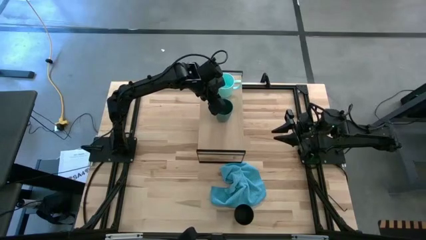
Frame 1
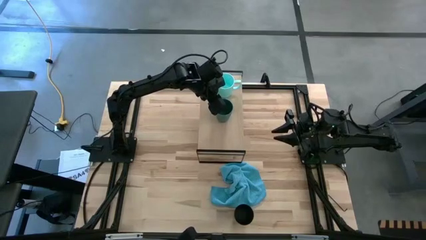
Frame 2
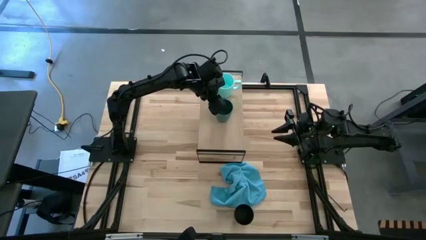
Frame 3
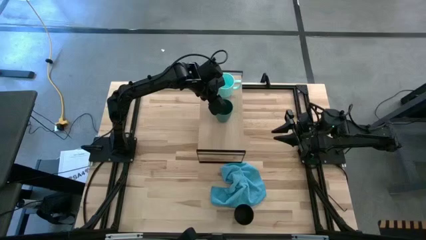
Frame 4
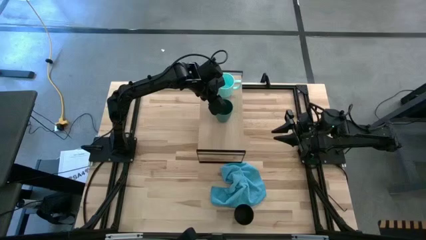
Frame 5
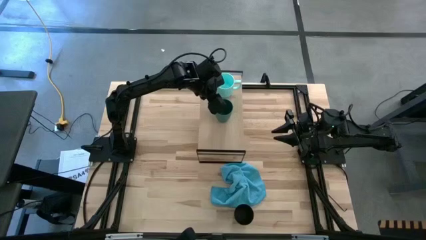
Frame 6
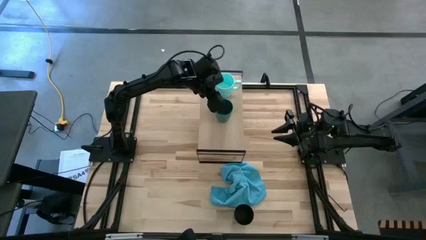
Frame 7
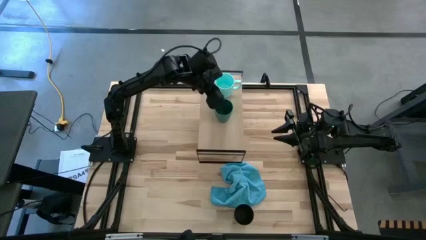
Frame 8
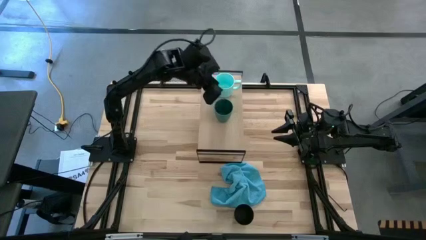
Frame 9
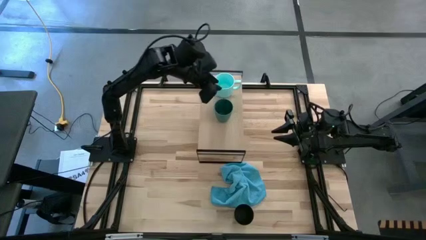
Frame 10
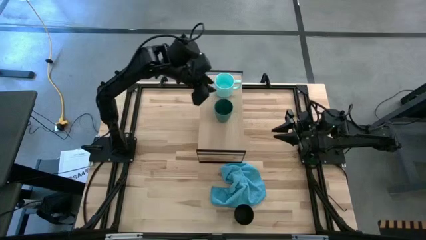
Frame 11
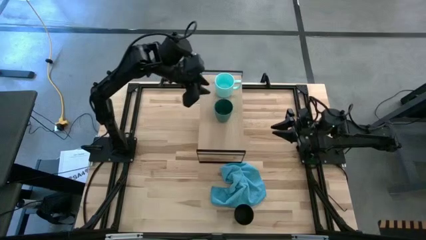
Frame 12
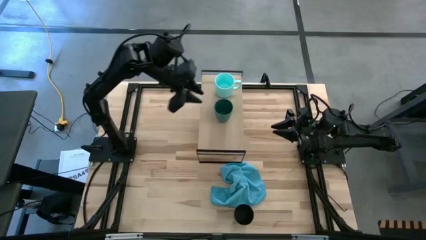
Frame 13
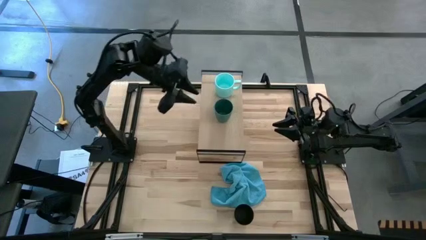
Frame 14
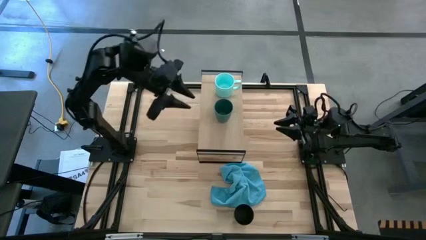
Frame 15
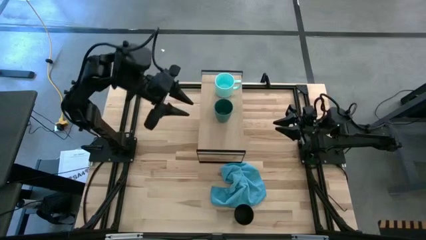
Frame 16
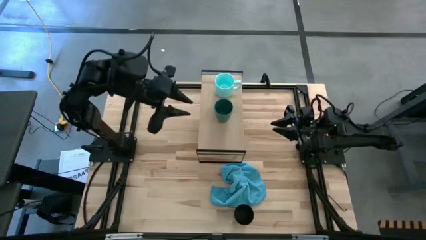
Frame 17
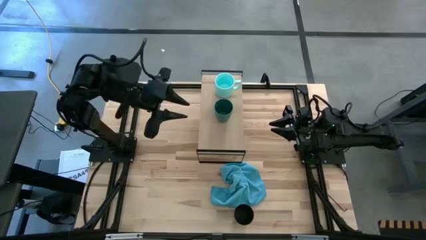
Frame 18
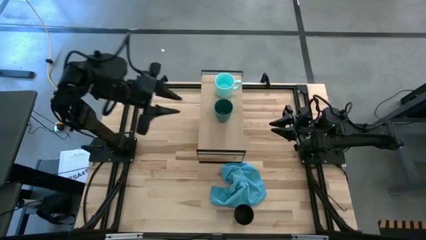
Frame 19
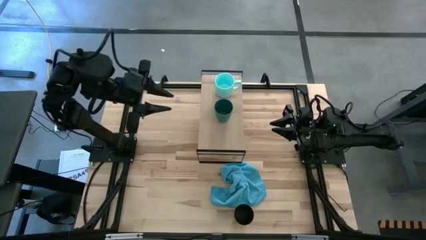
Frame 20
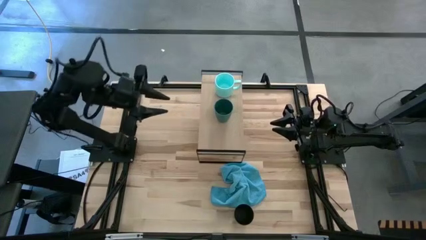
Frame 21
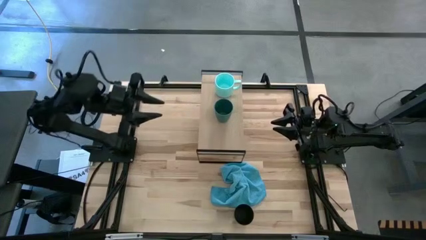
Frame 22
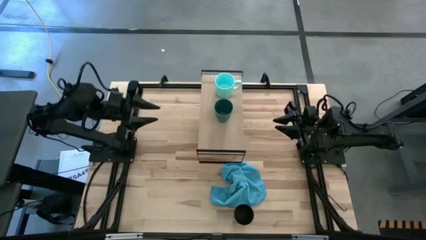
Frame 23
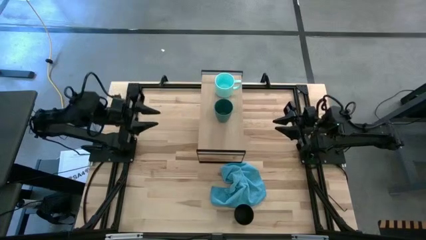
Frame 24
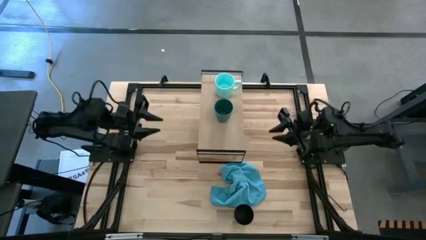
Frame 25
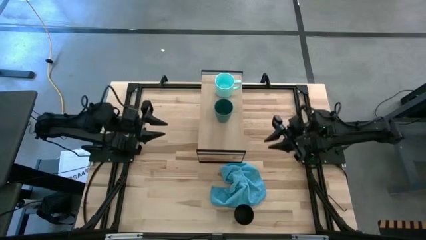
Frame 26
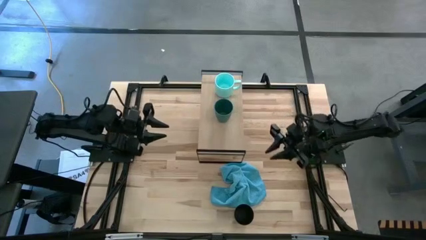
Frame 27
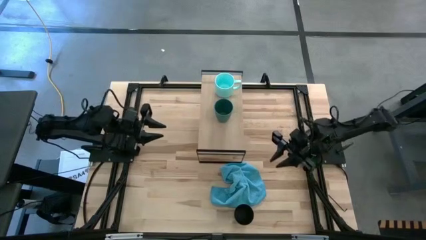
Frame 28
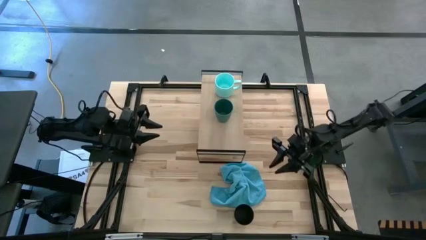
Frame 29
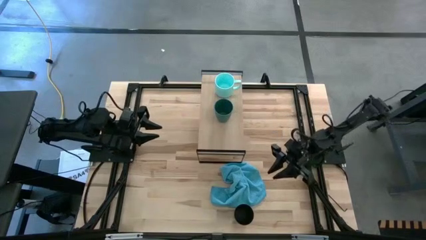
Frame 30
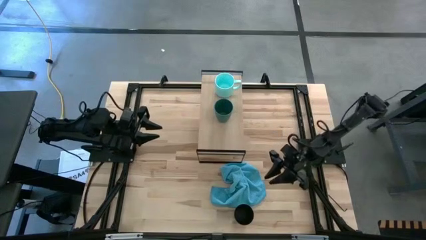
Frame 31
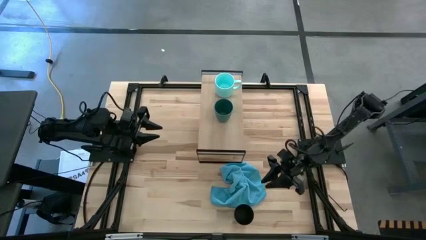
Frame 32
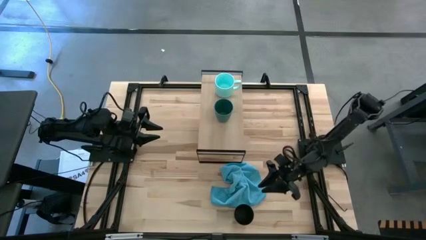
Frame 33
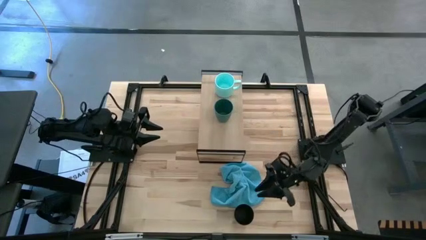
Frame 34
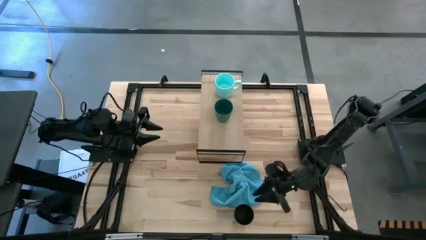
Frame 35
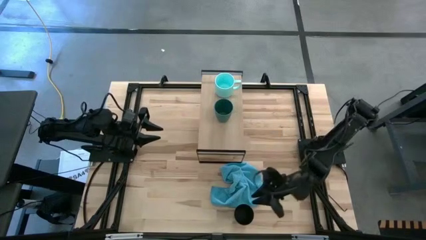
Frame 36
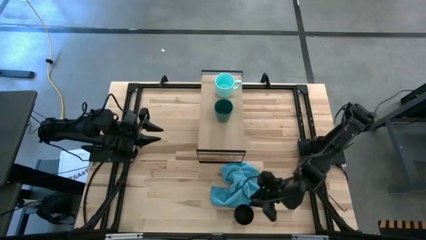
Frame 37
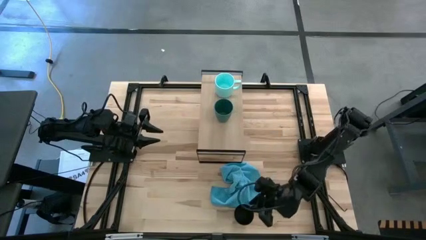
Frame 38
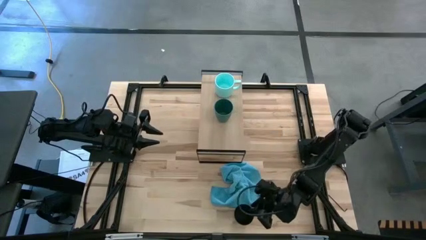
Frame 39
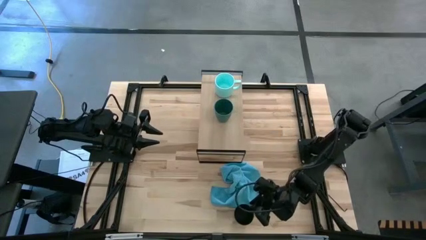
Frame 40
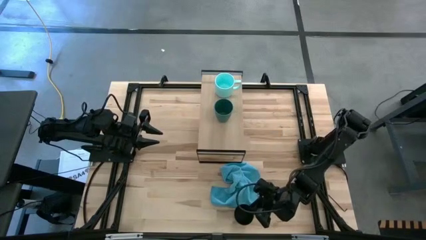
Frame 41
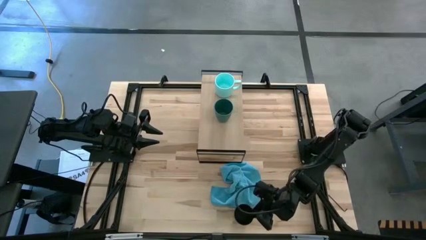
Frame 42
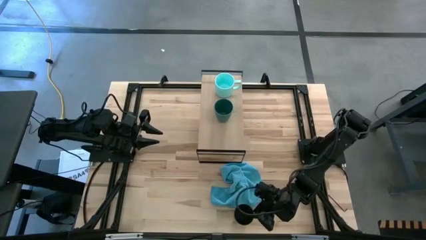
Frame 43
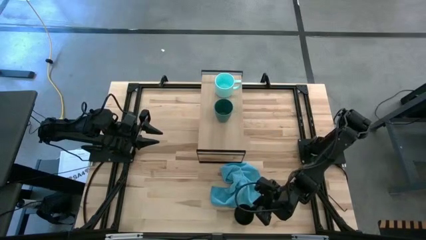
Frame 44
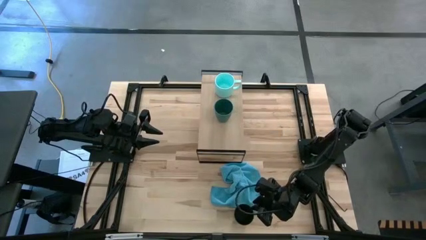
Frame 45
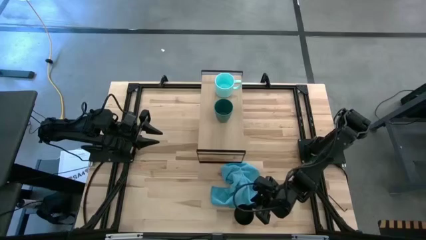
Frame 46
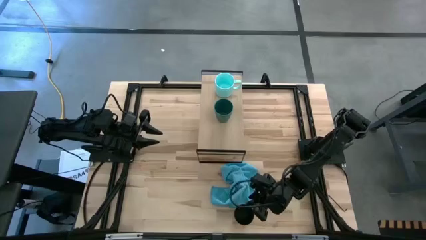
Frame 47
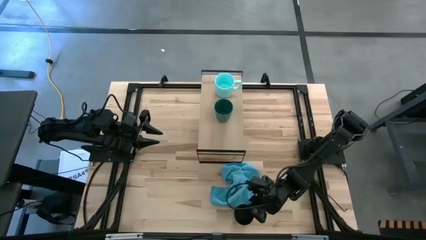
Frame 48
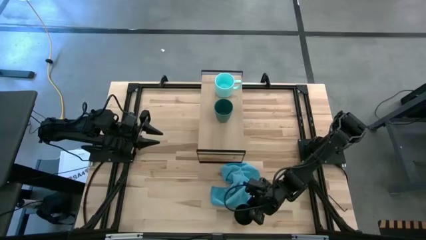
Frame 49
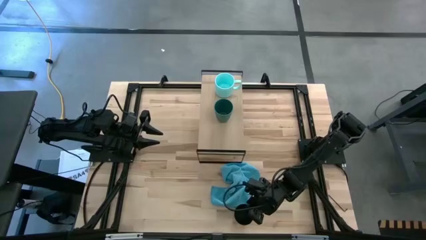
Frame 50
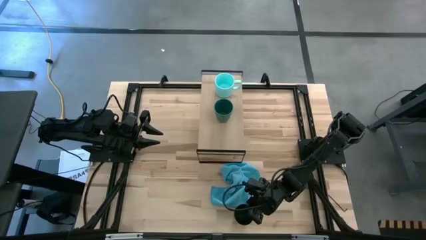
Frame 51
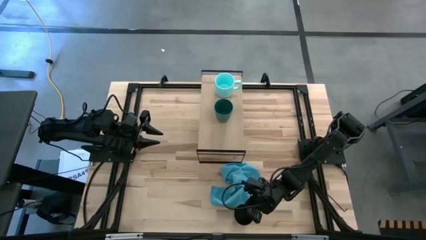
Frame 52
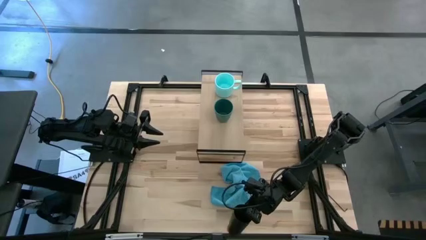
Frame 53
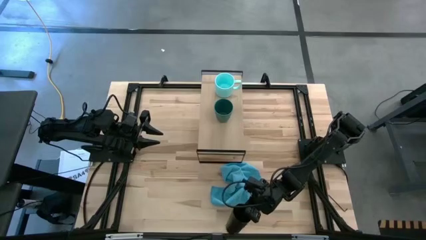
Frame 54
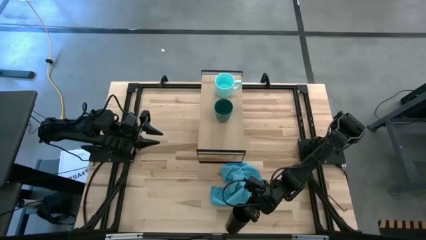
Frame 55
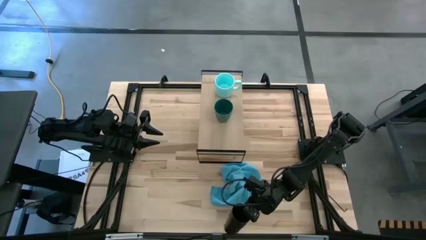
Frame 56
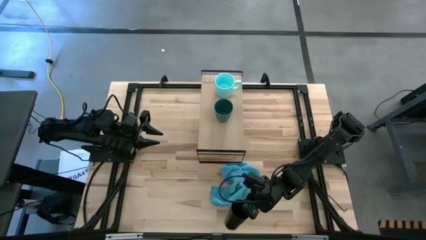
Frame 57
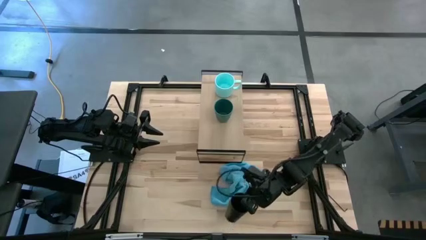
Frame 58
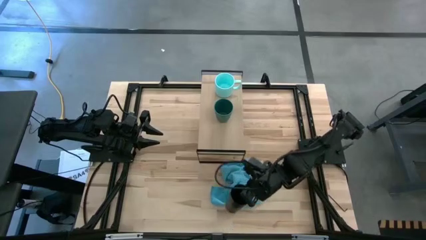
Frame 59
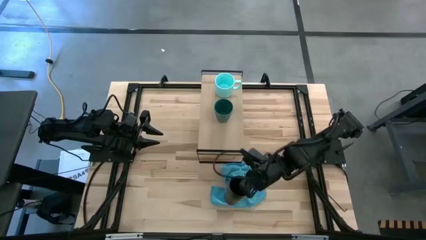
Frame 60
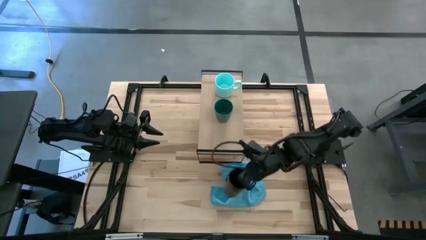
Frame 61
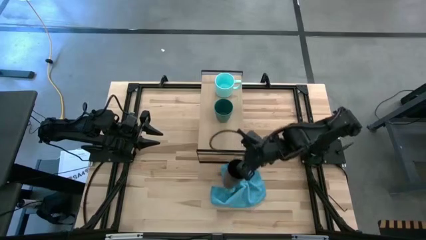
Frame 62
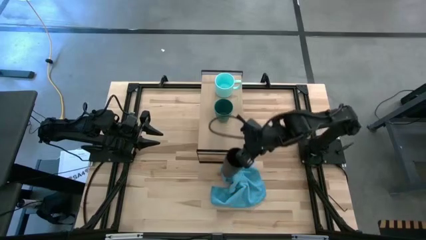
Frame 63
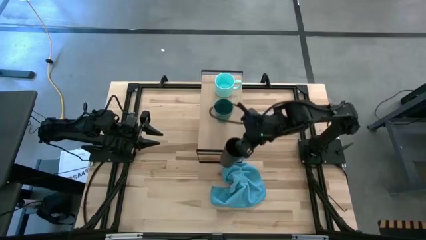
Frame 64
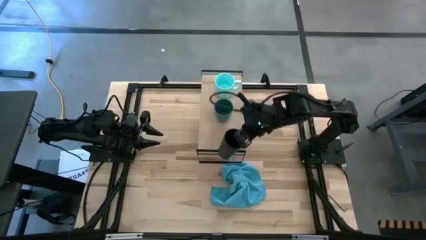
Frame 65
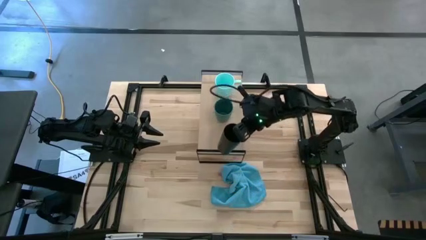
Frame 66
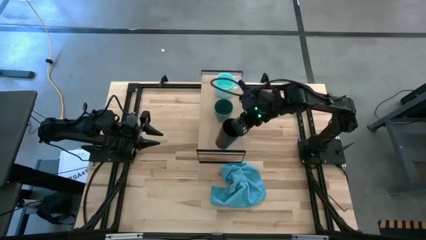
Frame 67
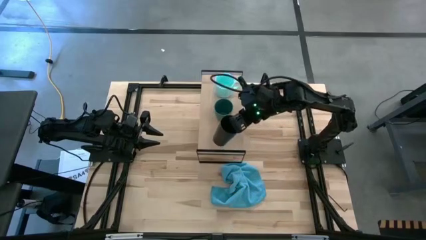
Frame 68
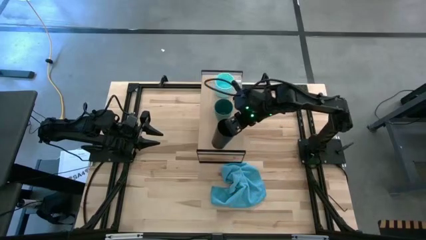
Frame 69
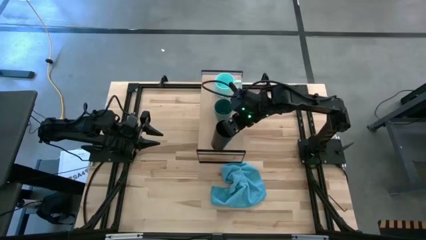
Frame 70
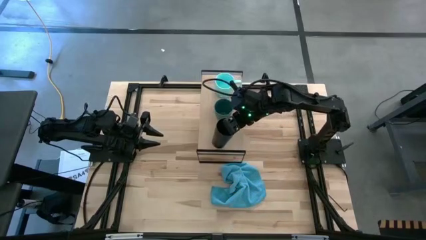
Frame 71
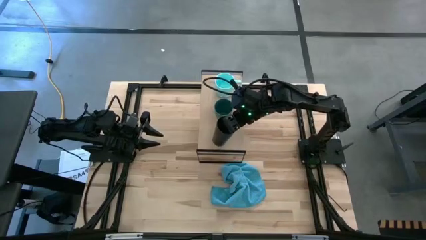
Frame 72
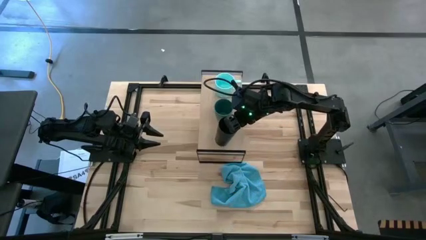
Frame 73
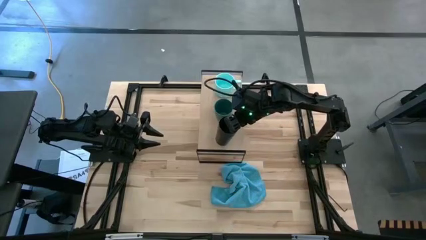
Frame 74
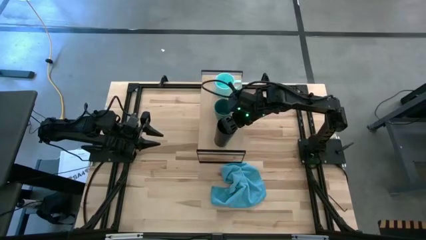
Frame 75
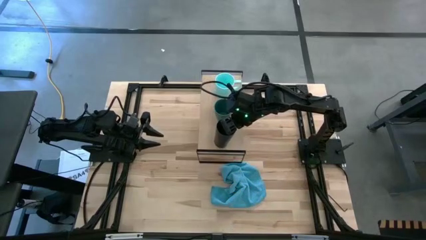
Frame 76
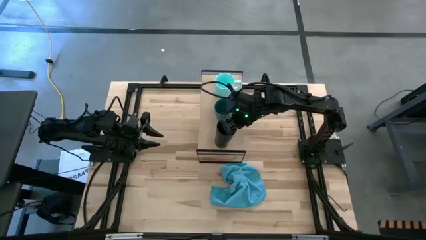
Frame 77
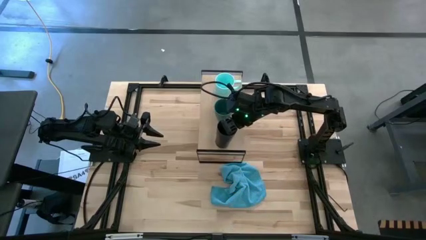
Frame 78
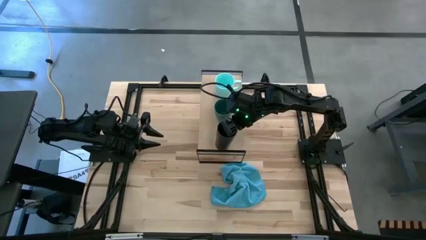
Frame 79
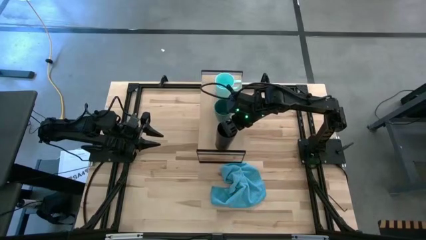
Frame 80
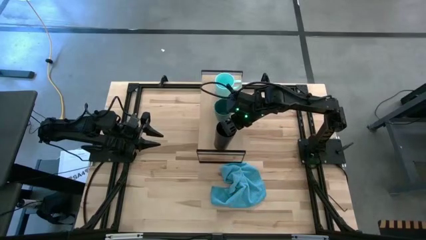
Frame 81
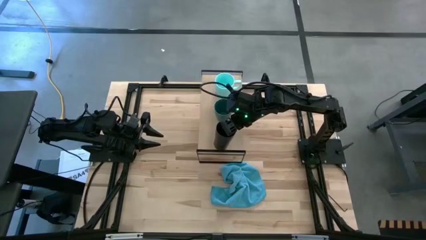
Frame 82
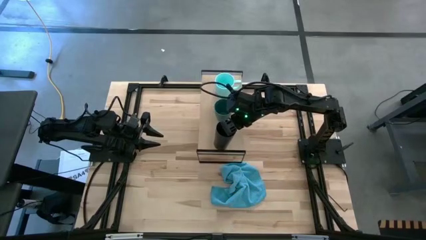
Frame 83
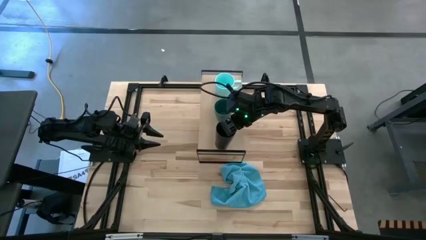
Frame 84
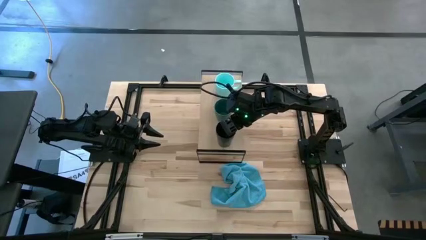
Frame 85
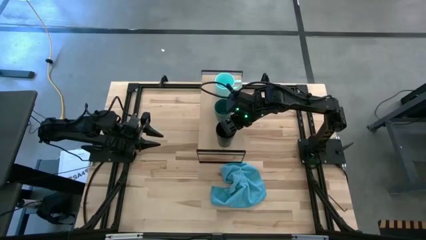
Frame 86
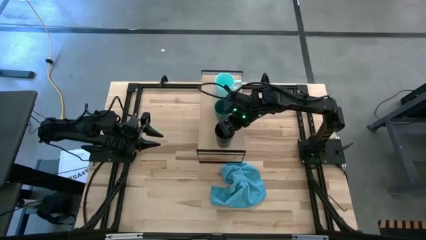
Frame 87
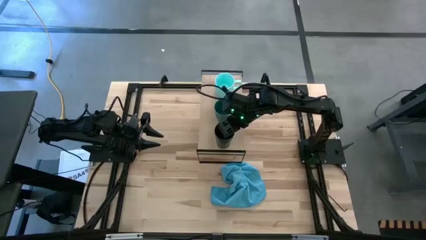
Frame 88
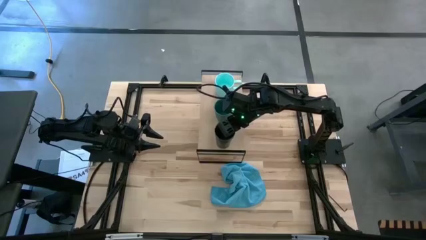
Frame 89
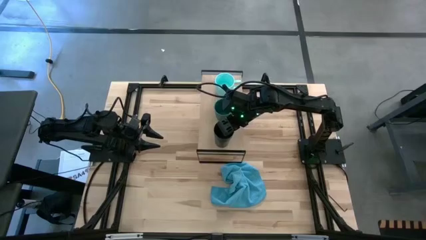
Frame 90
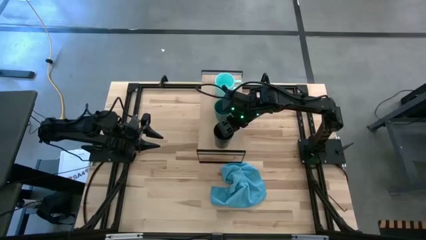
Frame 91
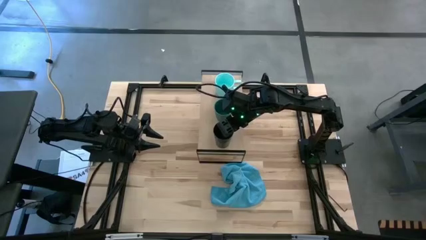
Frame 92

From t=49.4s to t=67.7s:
Task: Stack small to large cups/mugs on shelf
Put the black cup on the shelf
